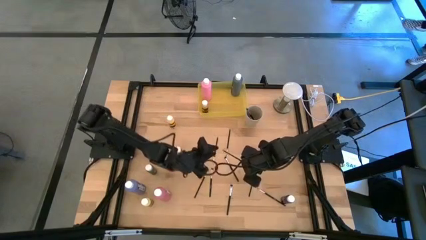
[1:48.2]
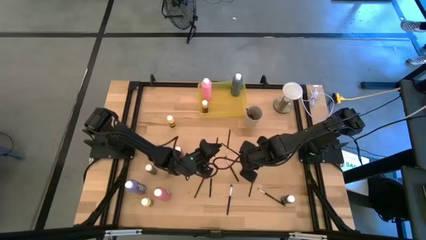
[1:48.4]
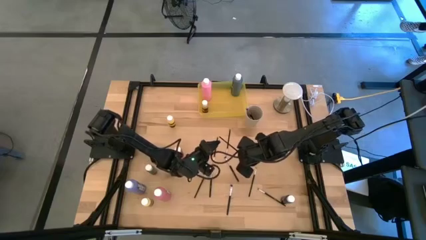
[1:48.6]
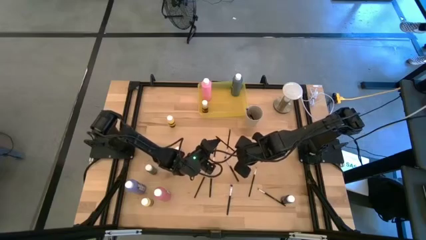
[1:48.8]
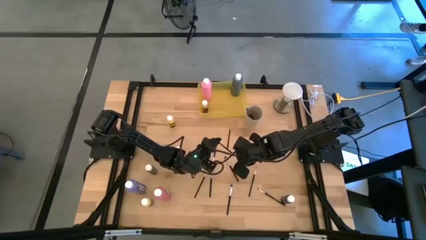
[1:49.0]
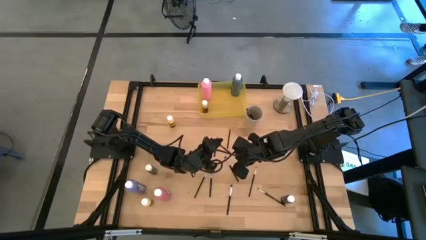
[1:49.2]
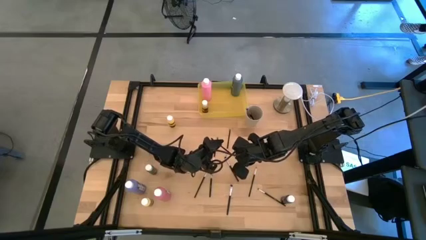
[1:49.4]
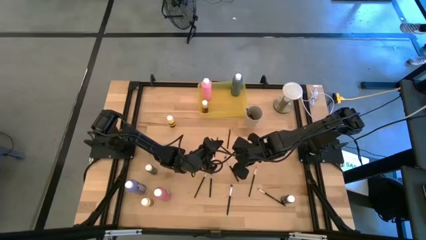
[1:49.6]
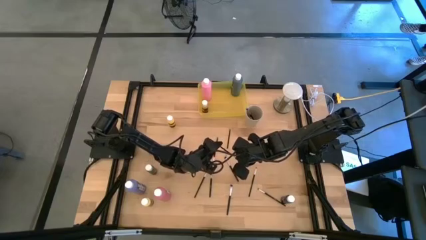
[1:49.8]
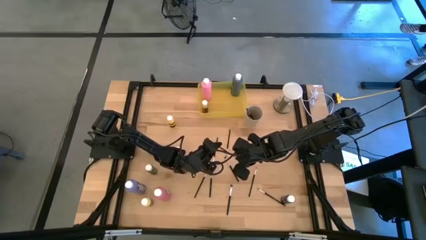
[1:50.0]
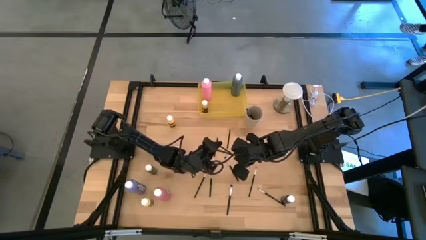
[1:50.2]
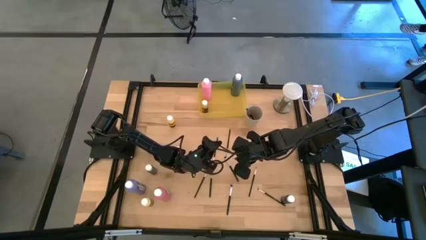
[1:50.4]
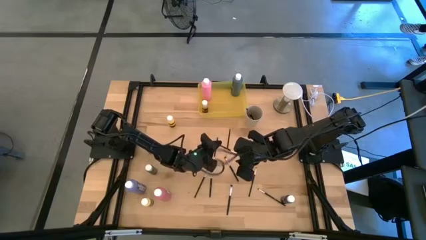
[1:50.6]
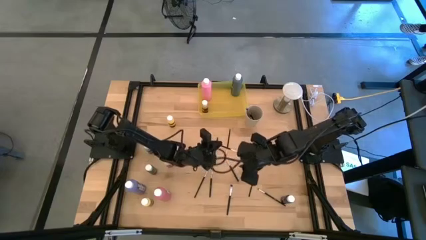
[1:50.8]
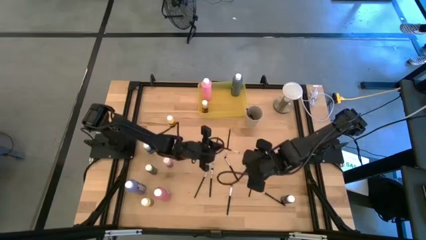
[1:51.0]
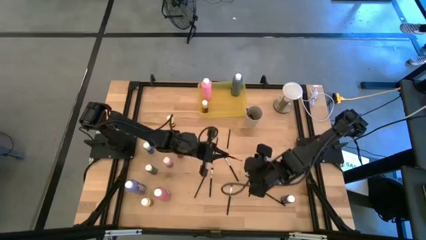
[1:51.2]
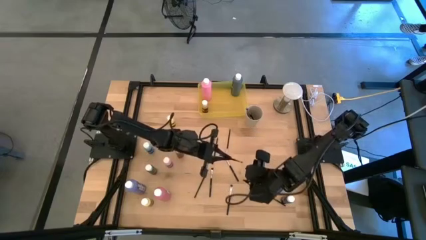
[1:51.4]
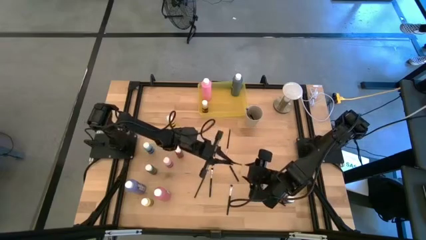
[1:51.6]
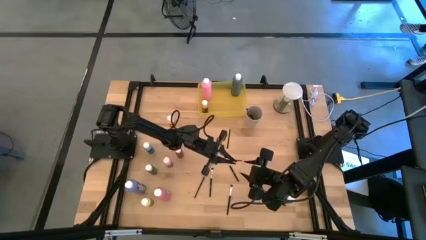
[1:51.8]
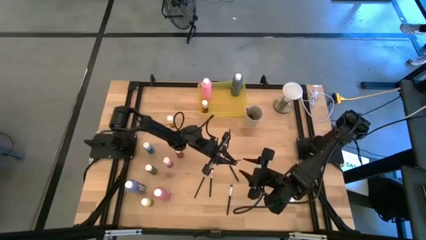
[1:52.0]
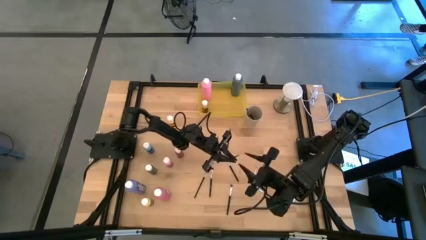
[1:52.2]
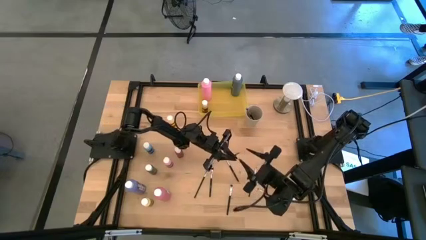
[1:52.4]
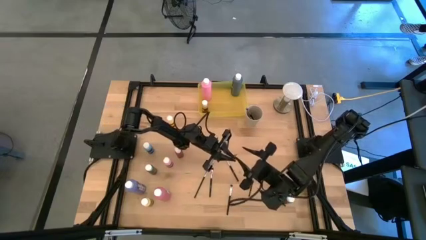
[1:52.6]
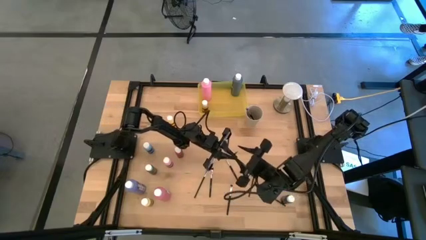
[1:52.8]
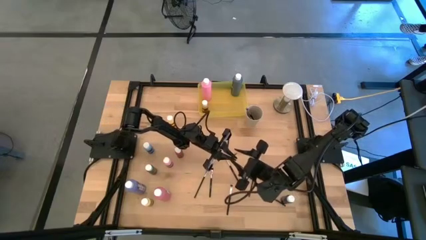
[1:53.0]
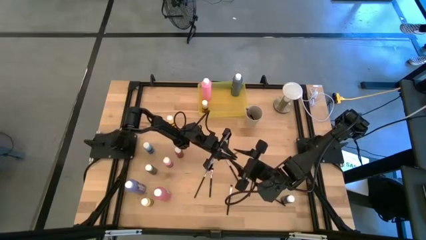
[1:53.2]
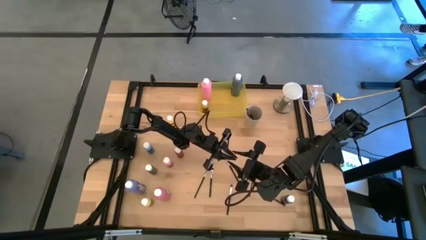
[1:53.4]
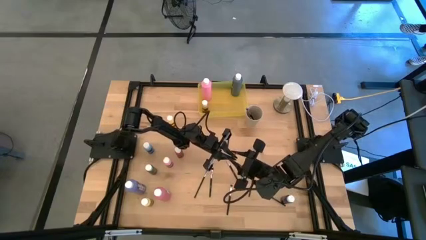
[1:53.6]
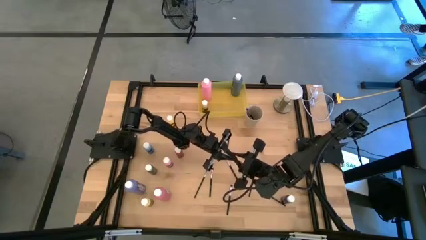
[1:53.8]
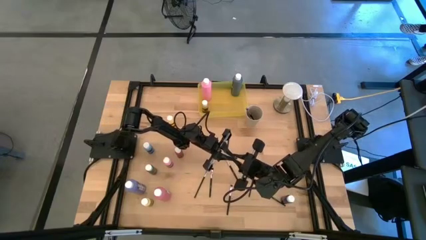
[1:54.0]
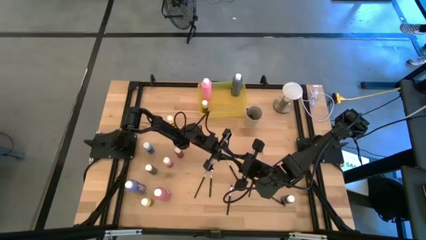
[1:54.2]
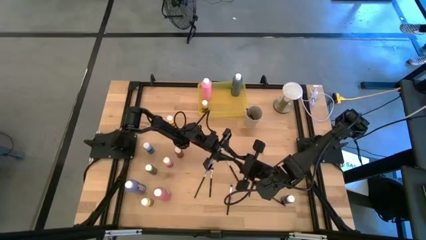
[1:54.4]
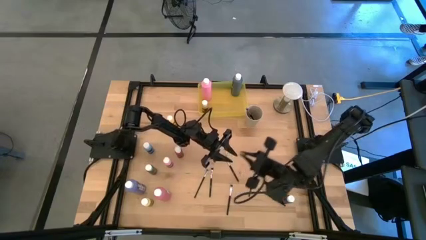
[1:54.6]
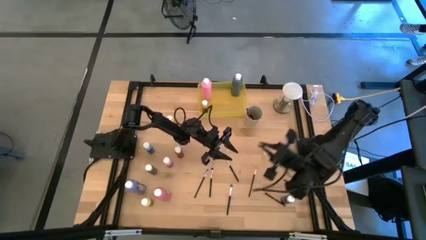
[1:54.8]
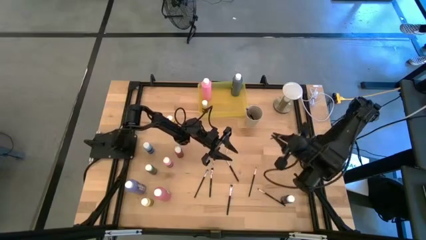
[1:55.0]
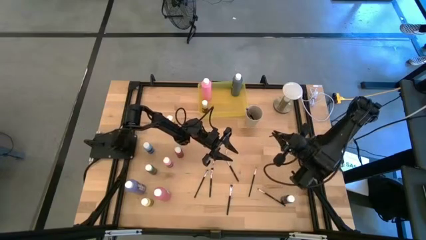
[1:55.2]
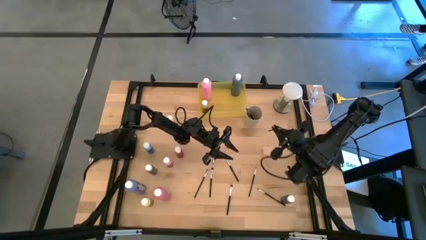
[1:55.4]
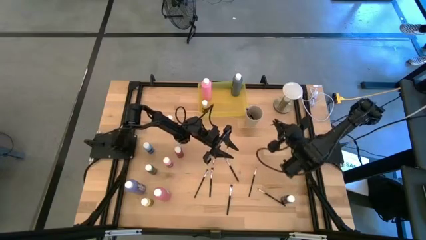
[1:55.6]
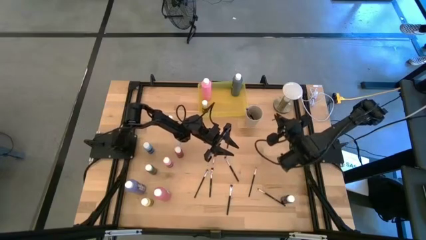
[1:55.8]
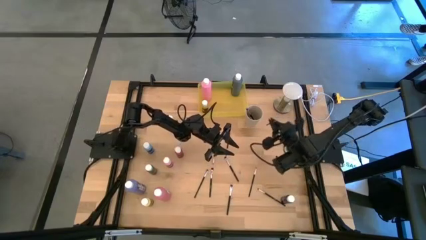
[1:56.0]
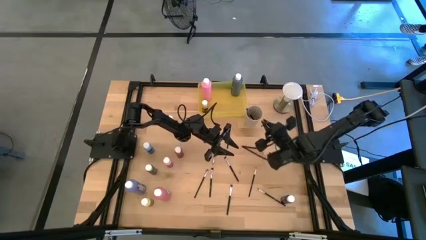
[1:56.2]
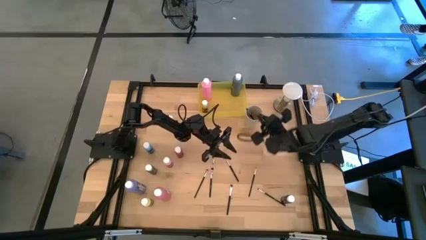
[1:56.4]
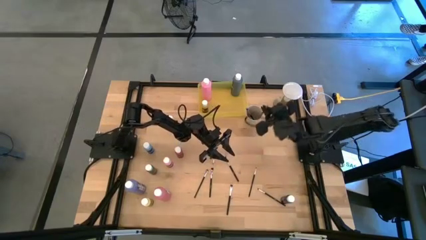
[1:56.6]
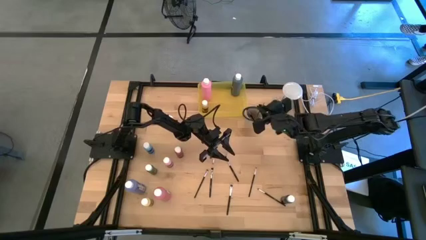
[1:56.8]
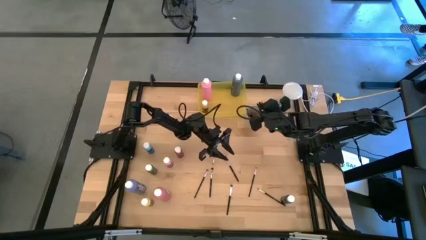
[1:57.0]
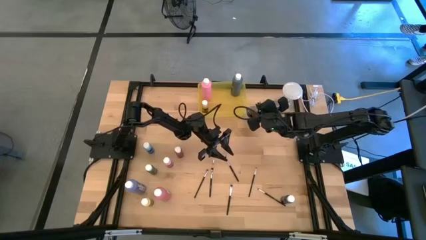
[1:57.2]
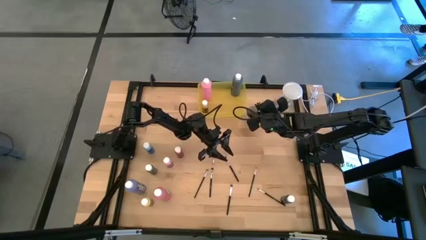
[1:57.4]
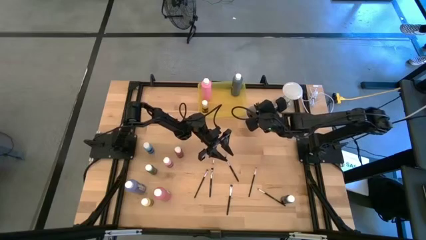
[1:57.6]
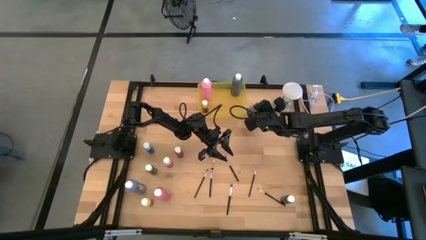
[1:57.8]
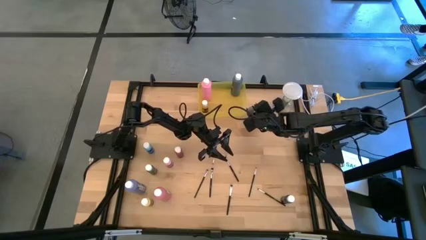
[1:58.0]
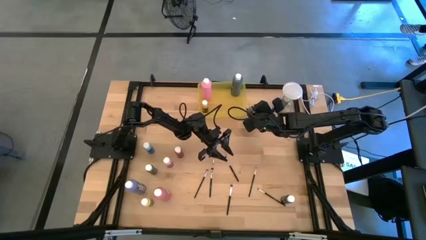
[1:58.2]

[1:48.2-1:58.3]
Task: Pick & Place Paint Supplies
Put the silver paint brush into the white cup

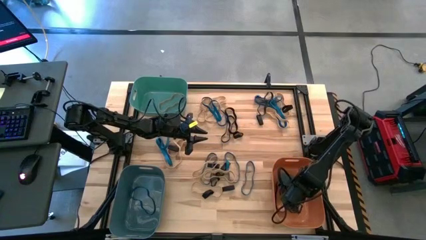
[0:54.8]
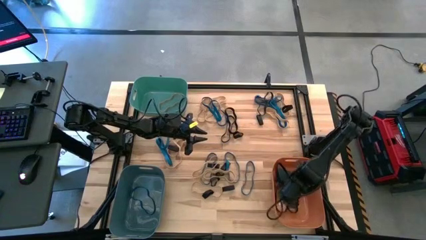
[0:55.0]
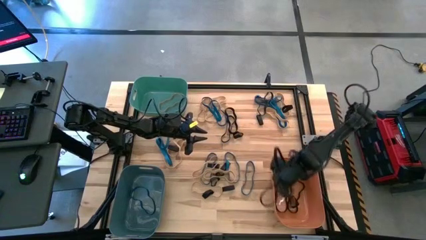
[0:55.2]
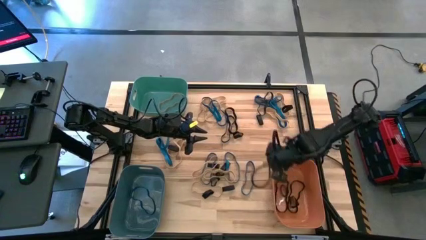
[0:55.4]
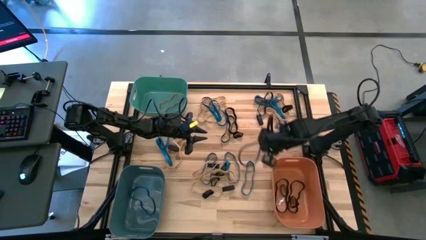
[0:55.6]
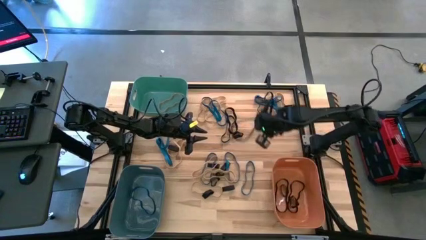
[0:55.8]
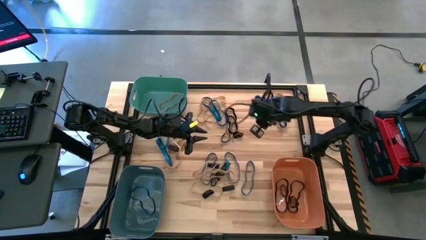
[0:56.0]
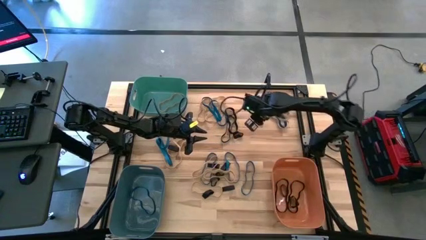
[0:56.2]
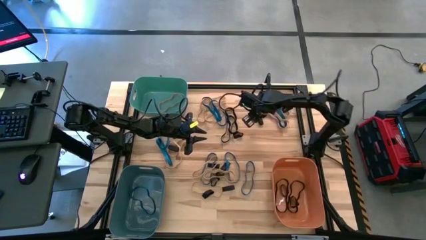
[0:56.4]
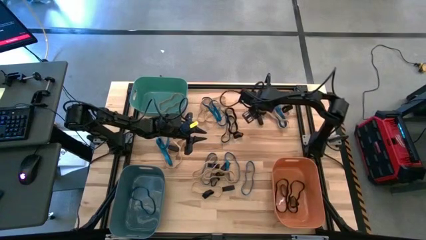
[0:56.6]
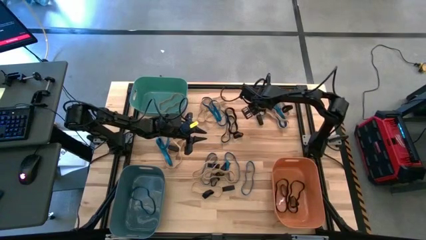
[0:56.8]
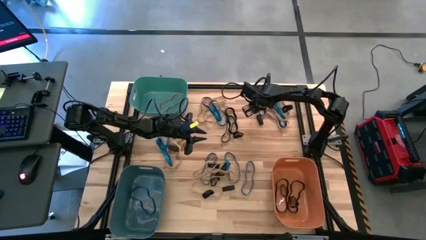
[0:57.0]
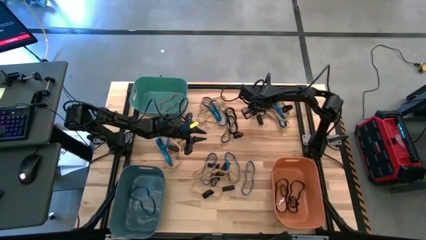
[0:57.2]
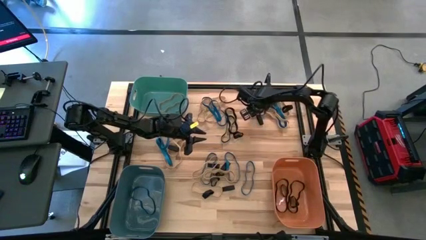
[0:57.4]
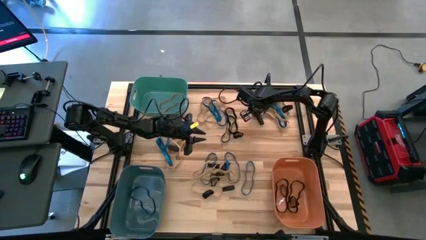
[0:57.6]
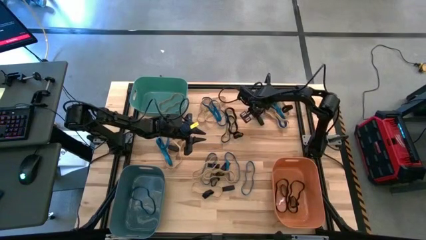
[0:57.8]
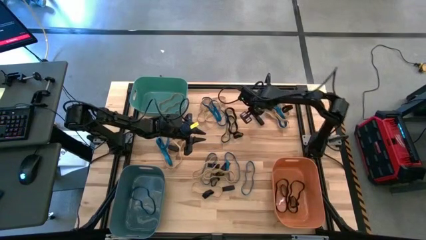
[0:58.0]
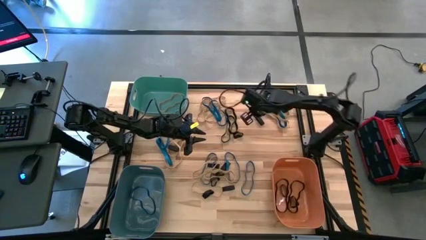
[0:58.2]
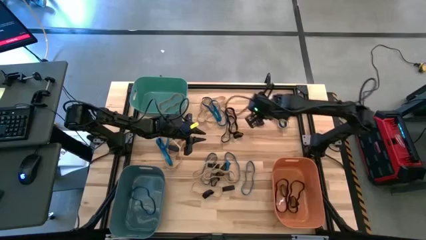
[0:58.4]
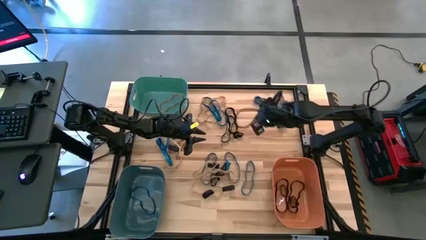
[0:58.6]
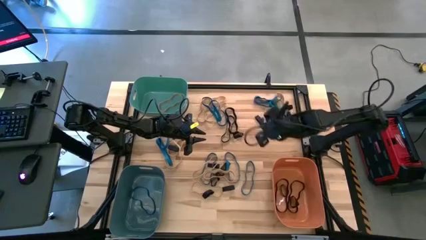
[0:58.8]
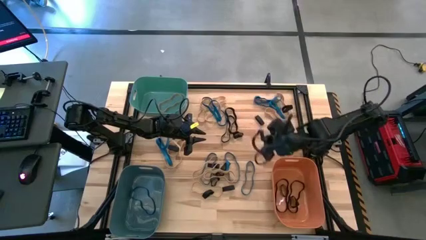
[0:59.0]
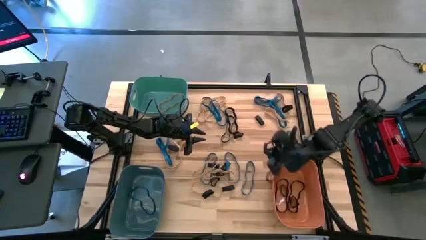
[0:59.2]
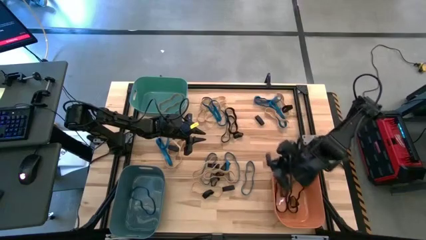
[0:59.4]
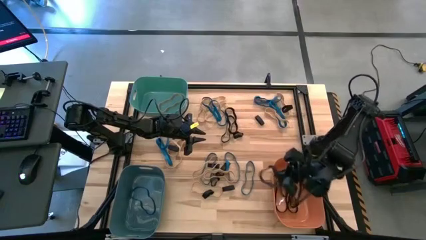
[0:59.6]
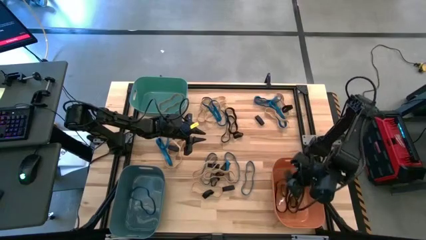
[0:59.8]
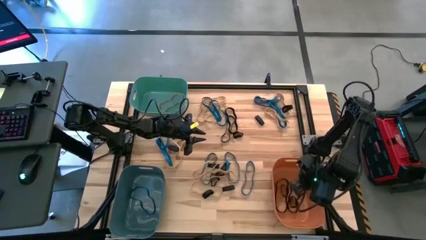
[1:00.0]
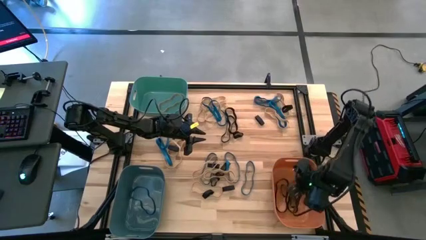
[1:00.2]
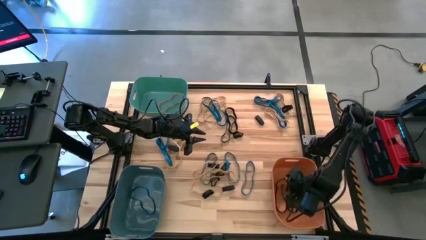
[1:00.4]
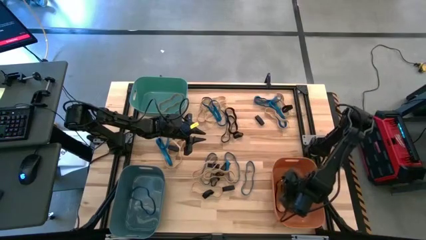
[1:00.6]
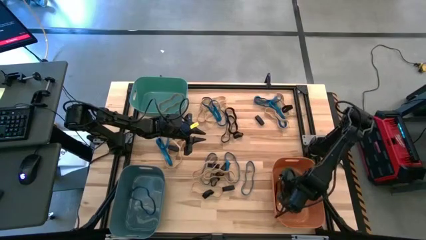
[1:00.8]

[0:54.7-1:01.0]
Task: Sort rubber bands into baskets
Put the black rubber band into the orange bin
